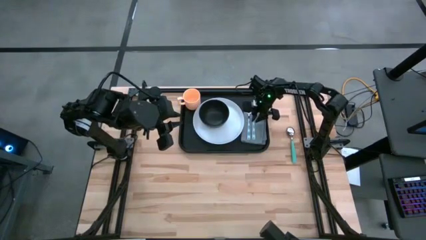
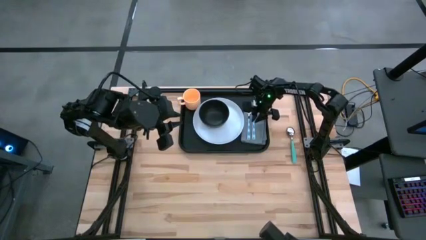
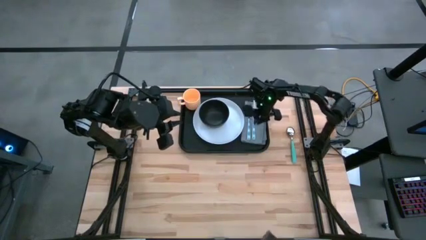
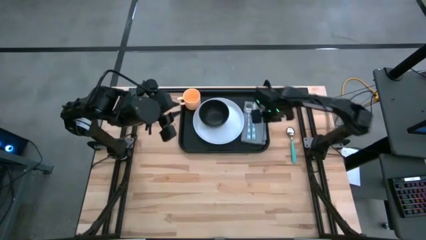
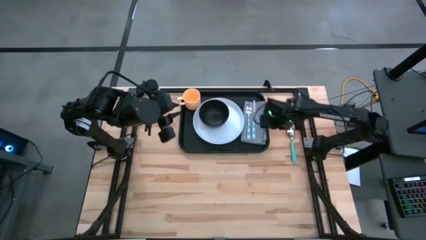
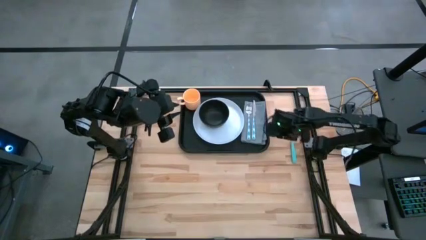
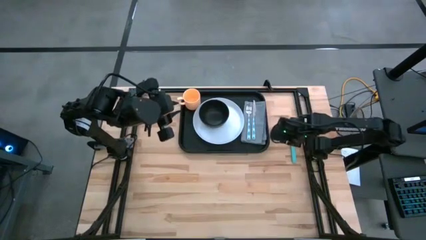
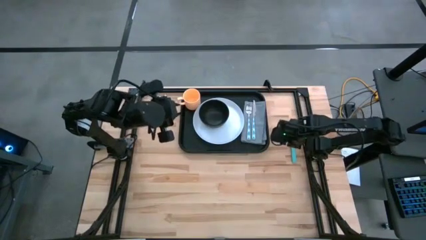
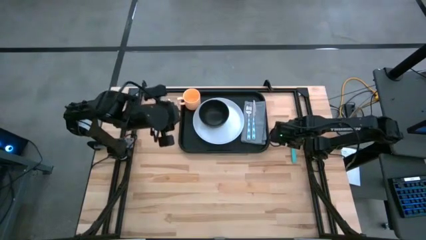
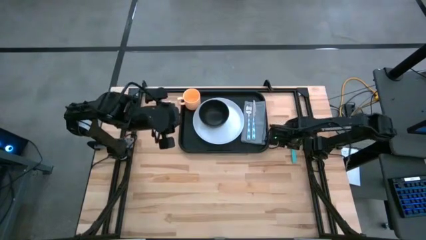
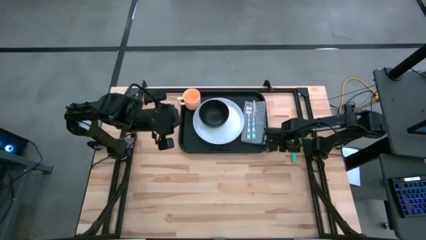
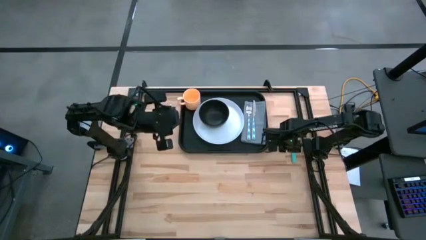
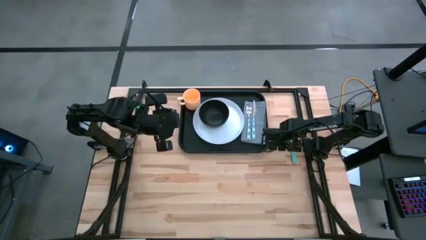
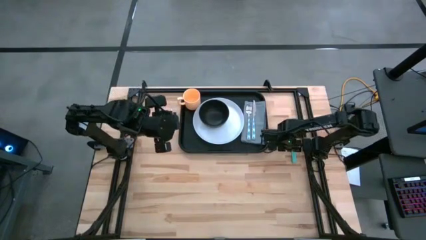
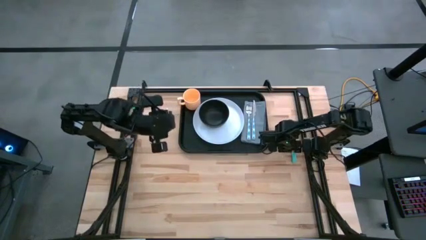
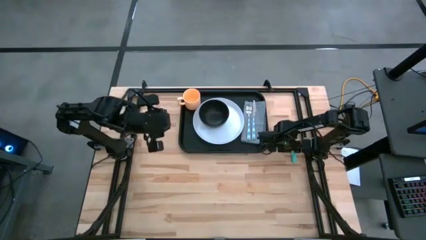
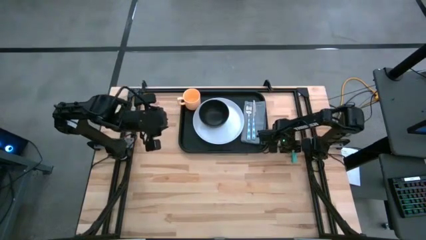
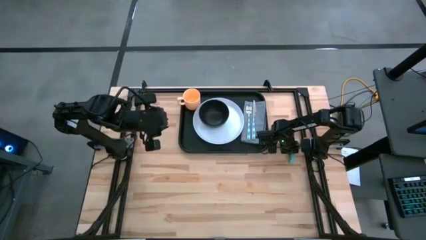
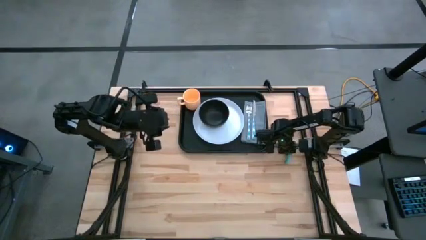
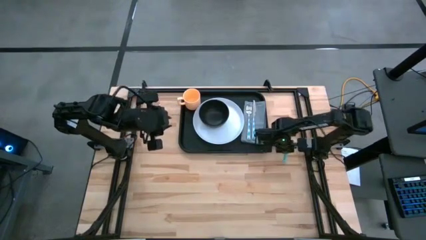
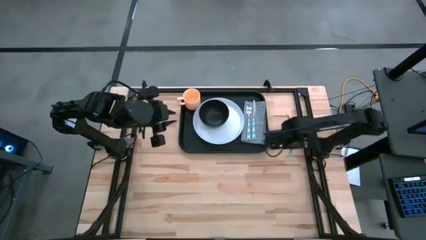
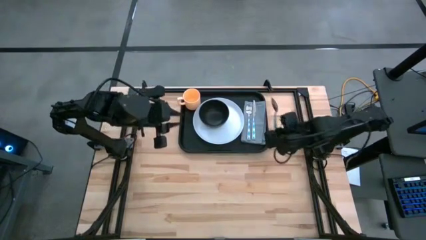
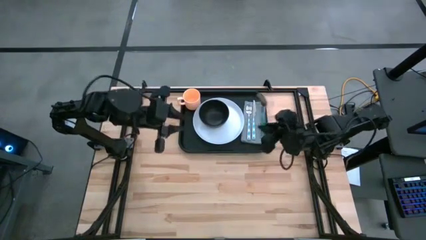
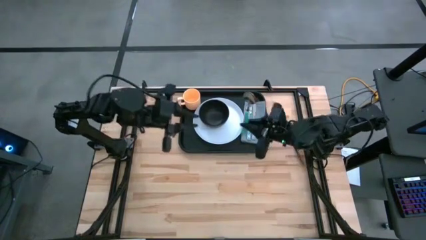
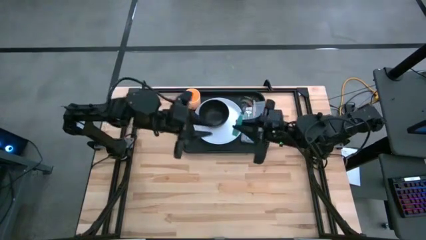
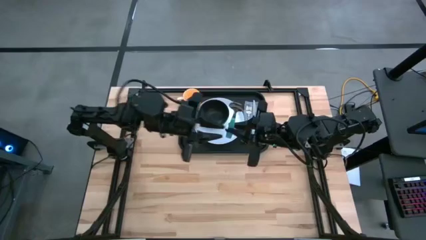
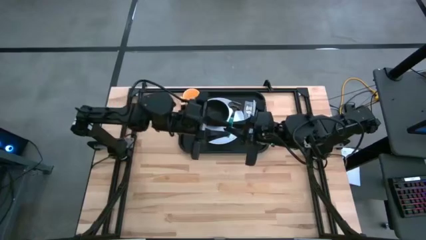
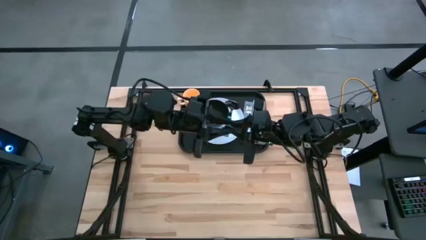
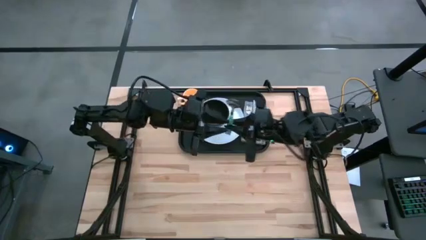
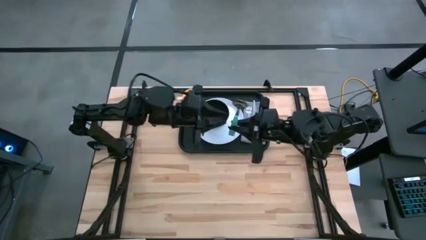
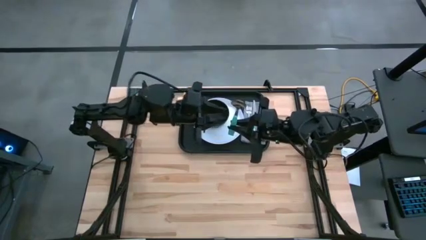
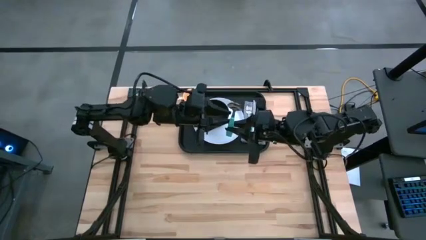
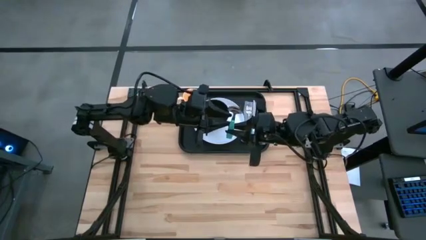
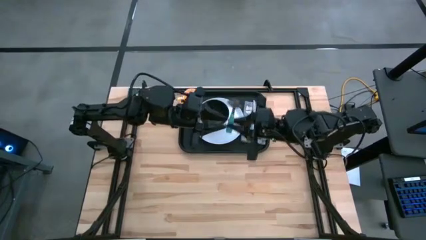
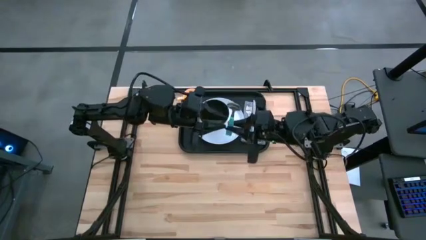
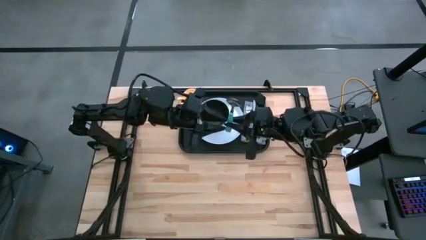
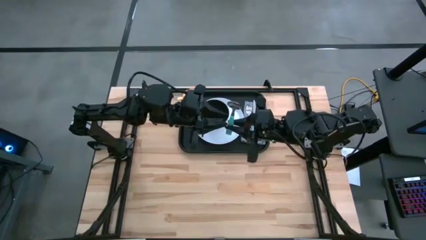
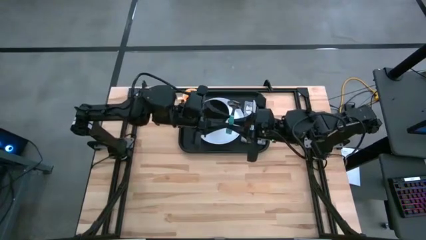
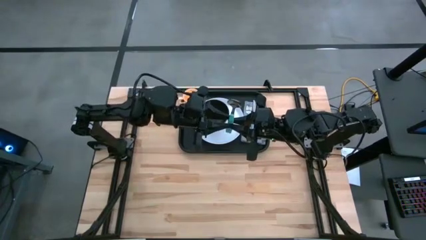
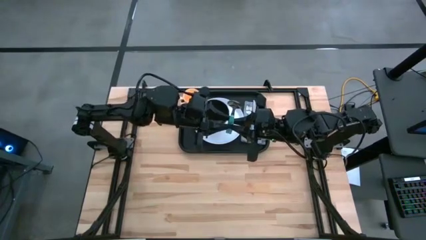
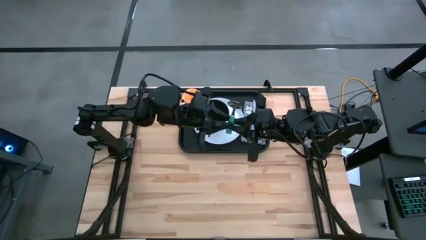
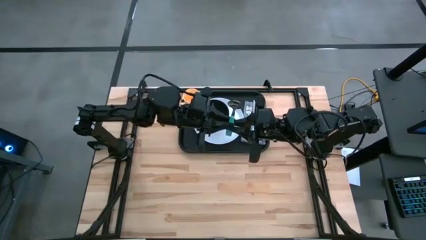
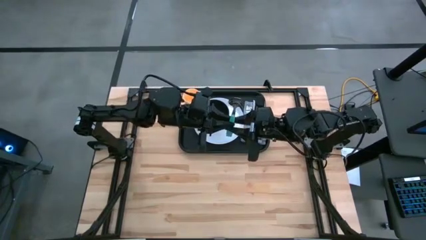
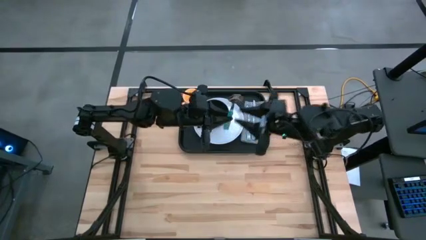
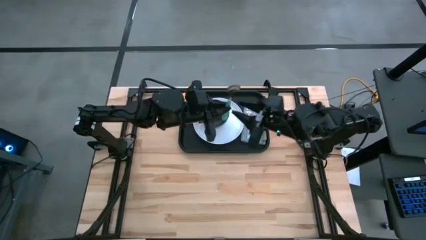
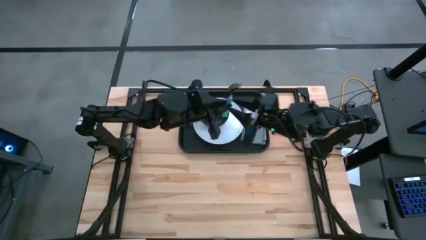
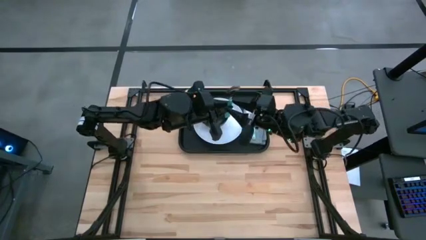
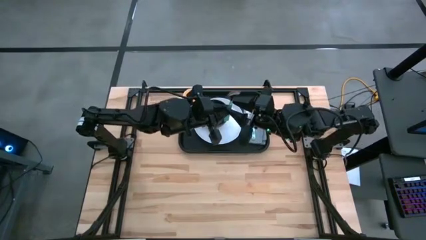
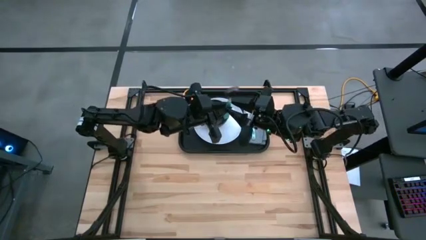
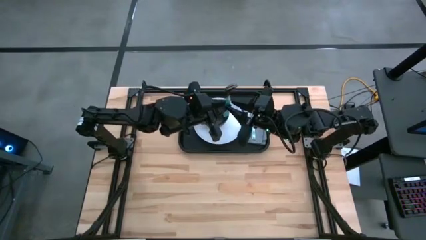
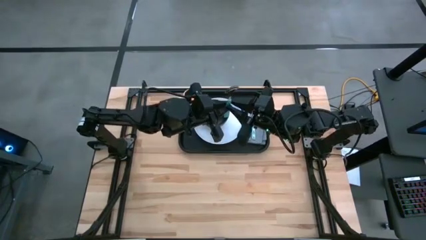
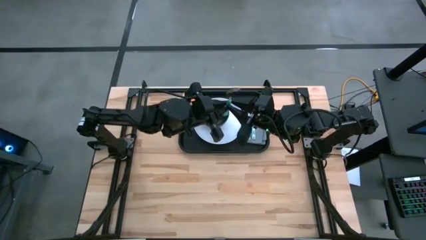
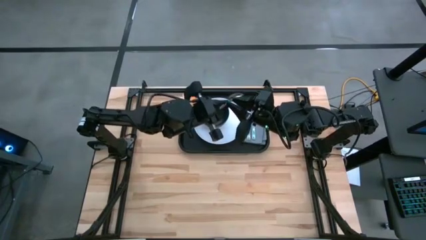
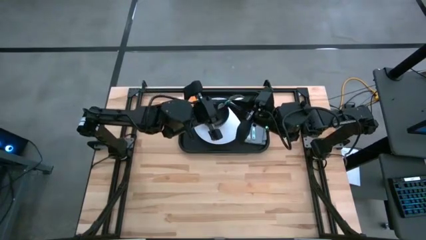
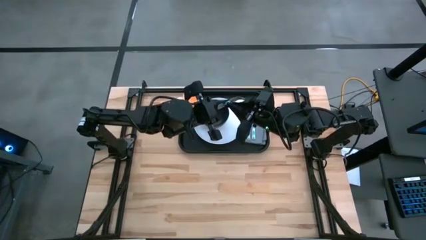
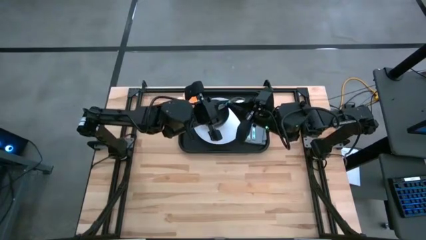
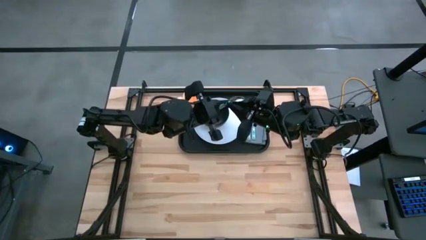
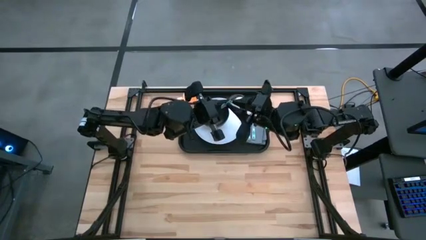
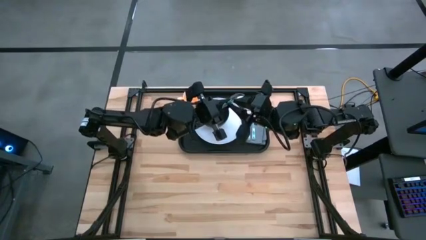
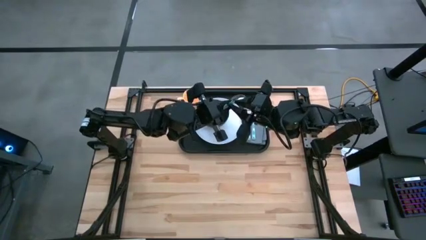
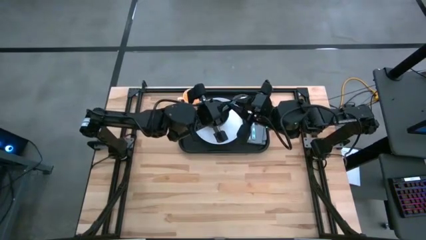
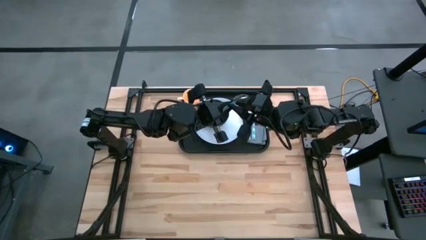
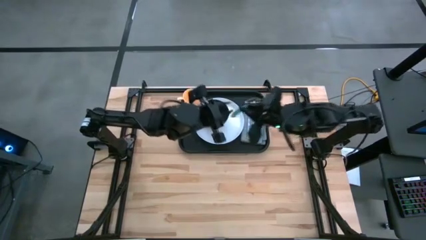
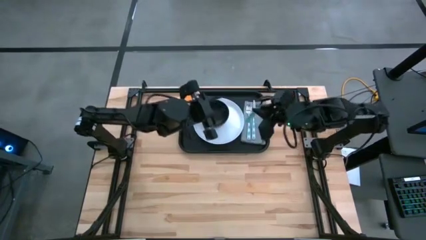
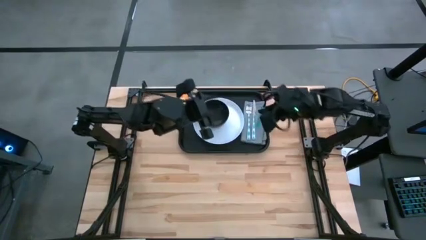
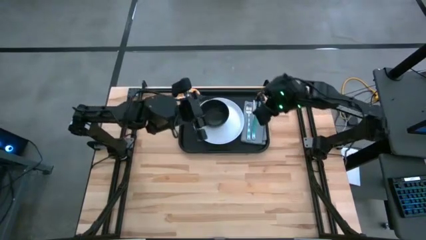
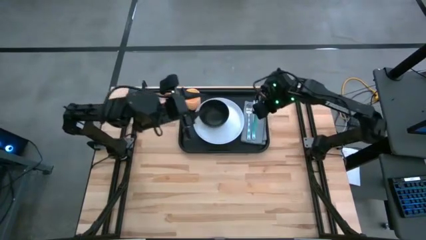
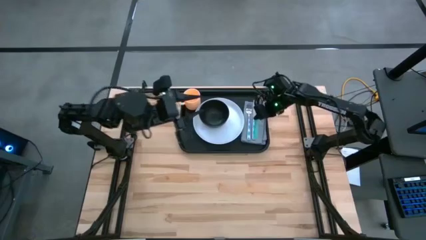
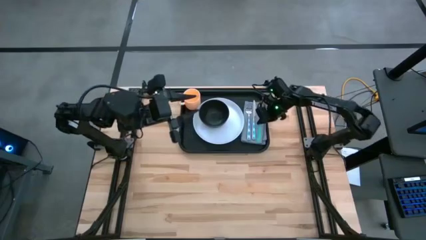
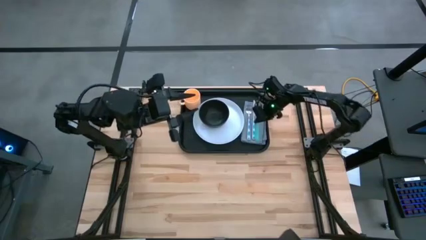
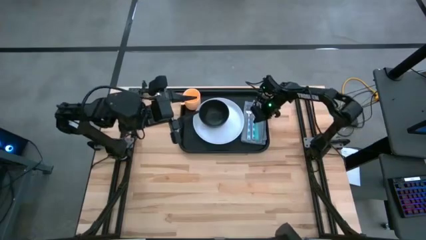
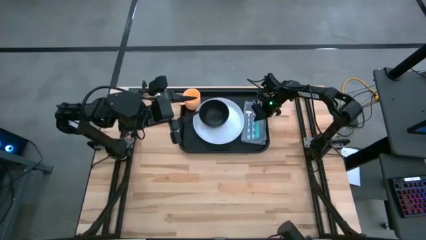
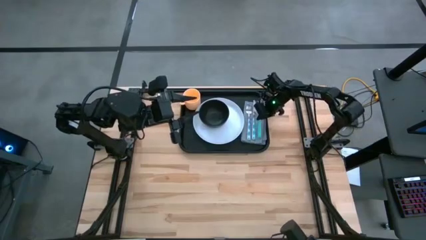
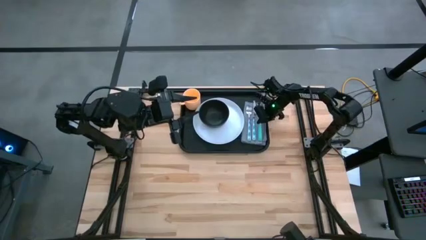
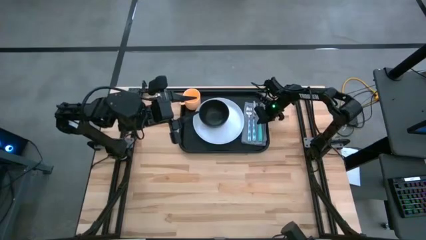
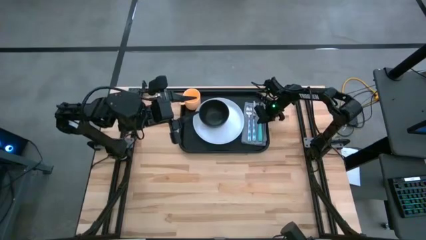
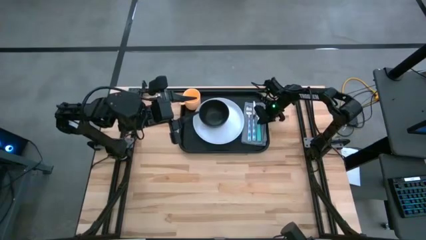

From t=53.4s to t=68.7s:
Task: Set up tray
Put the blue spoon on top of the gray napkin on the black tray

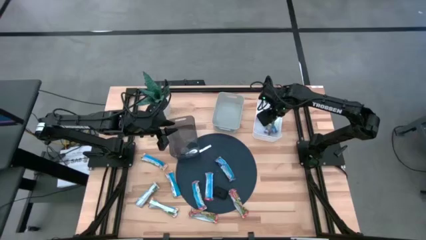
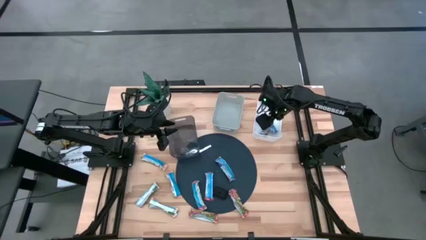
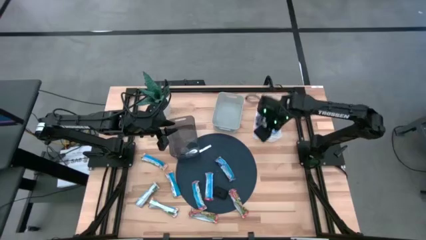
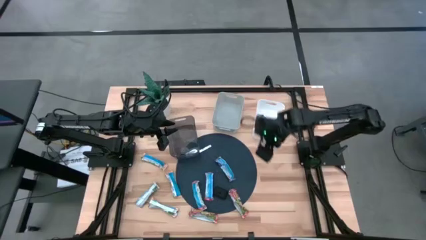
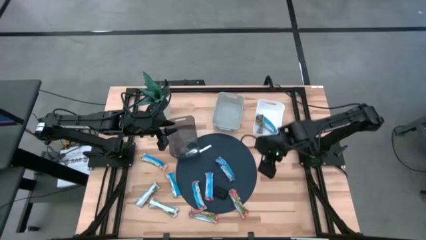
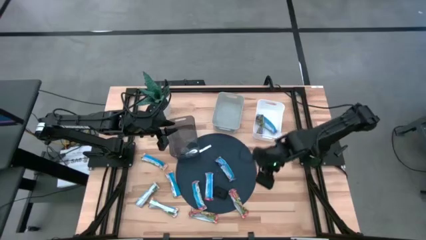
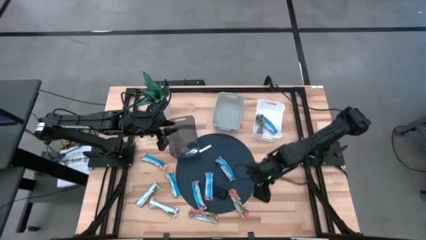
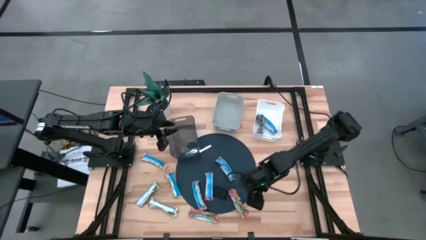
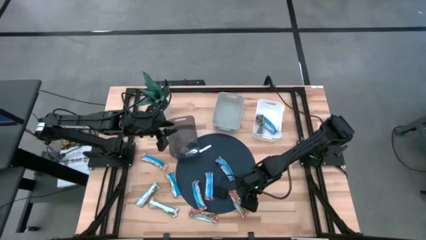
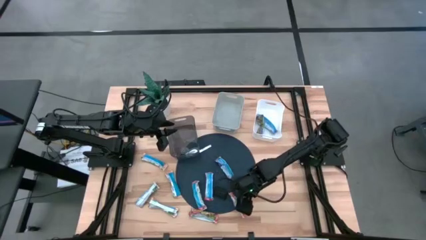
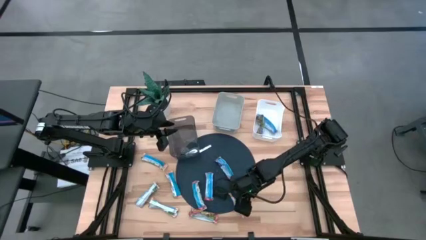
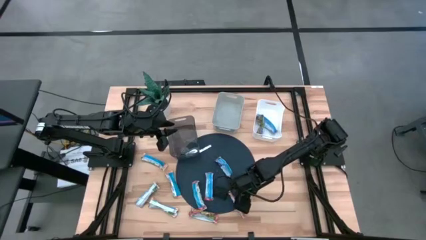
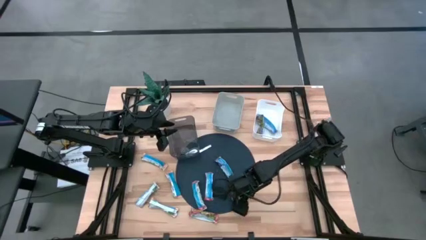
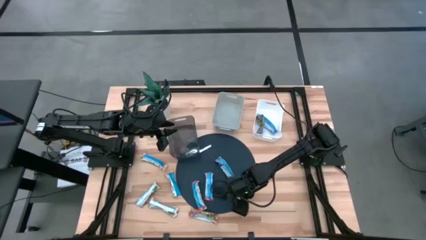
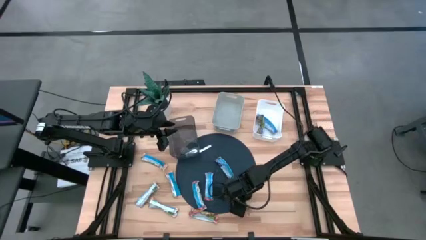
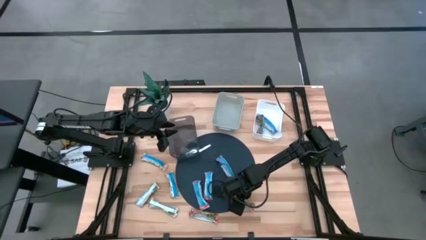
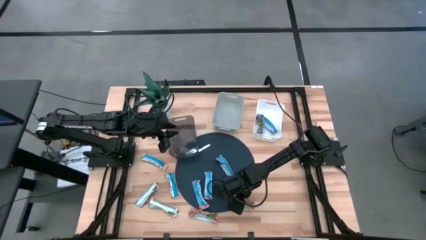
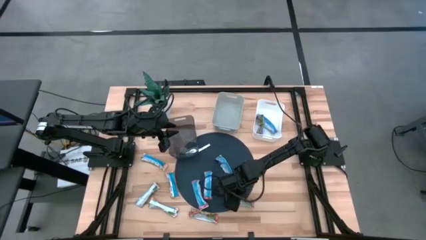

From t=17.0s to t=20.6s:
Task: Pick and place Granola Bars by type
Put the red granola bar into the gray bin
